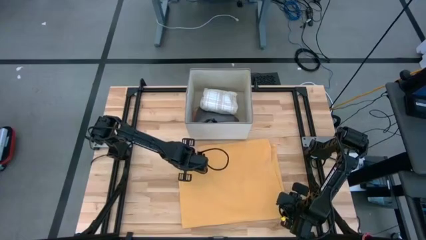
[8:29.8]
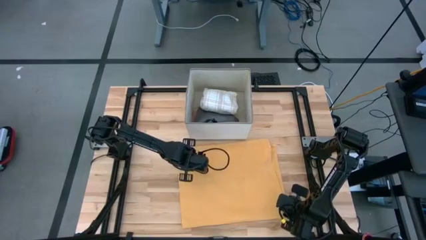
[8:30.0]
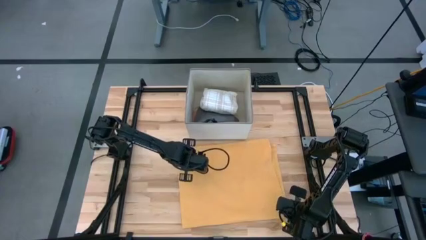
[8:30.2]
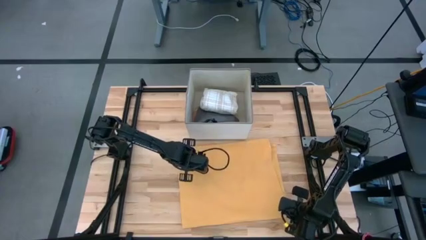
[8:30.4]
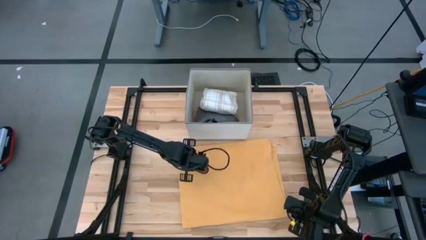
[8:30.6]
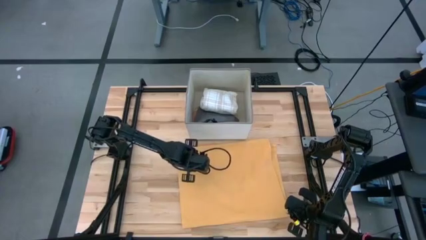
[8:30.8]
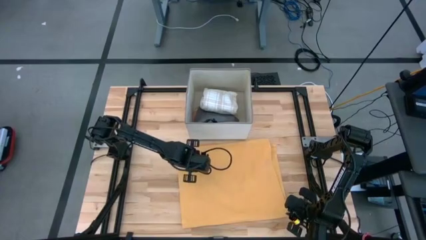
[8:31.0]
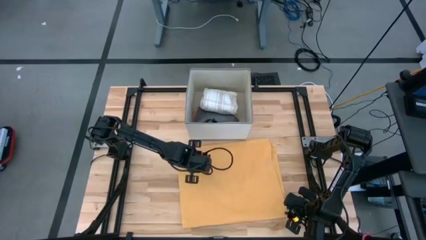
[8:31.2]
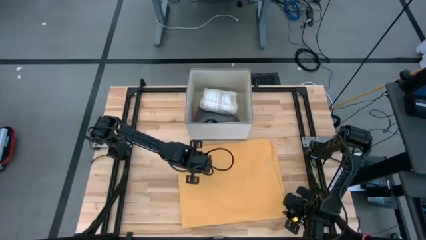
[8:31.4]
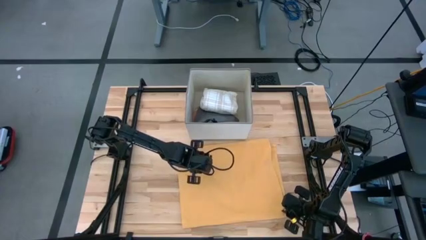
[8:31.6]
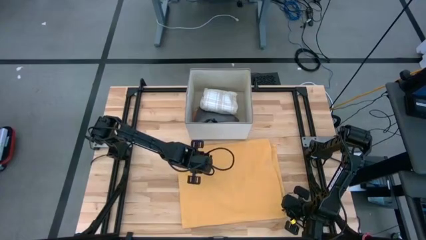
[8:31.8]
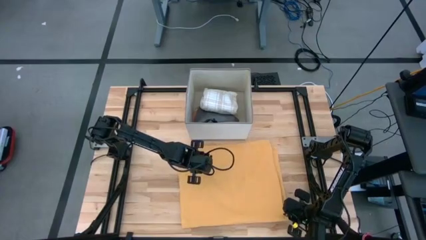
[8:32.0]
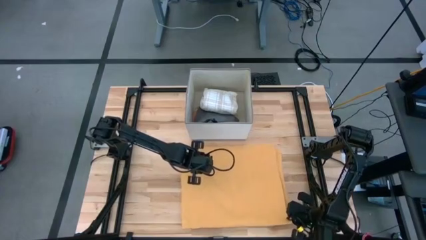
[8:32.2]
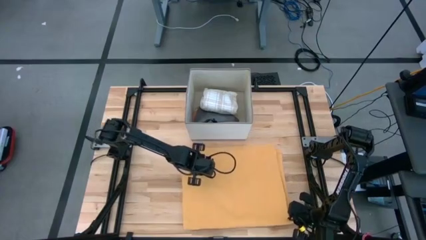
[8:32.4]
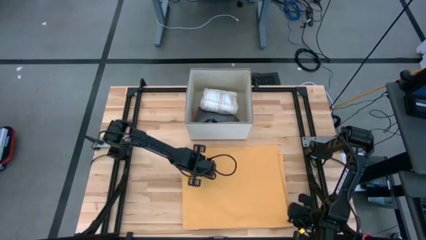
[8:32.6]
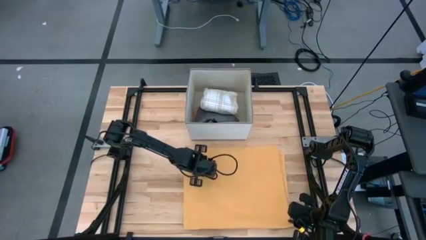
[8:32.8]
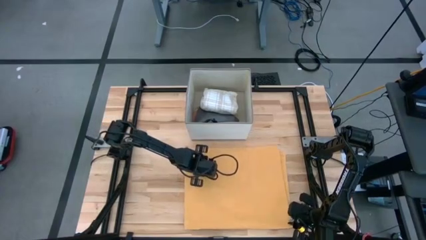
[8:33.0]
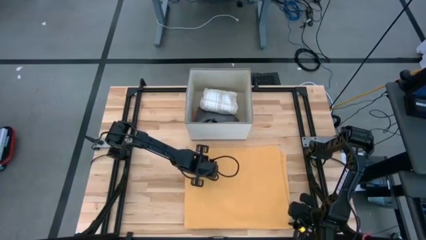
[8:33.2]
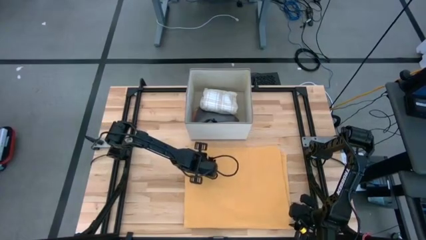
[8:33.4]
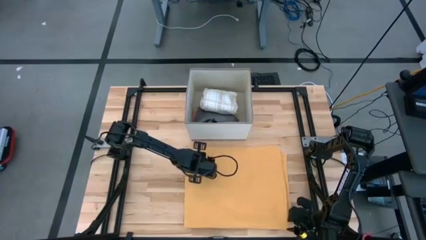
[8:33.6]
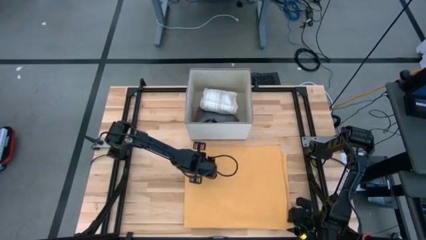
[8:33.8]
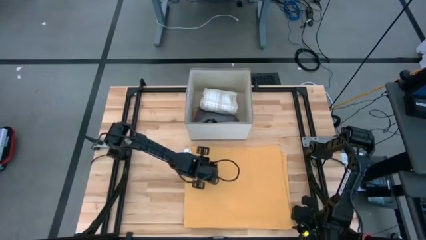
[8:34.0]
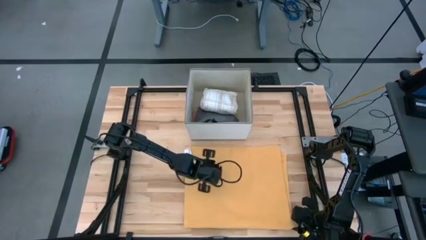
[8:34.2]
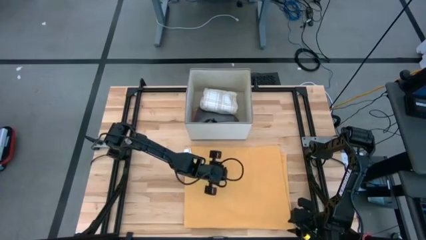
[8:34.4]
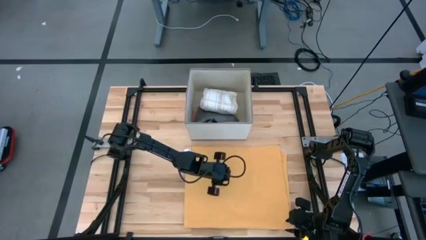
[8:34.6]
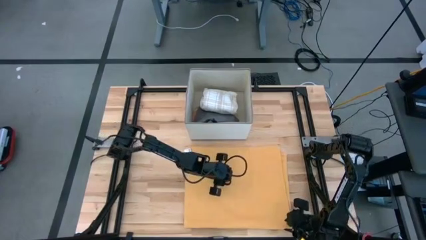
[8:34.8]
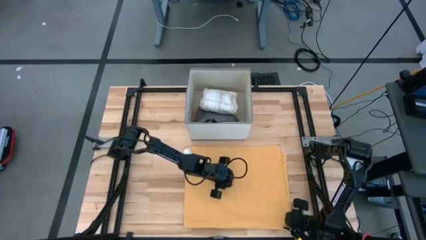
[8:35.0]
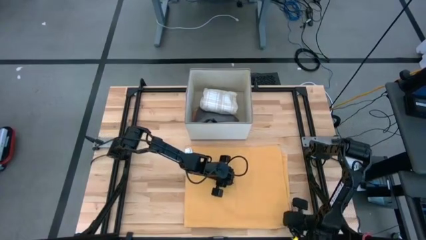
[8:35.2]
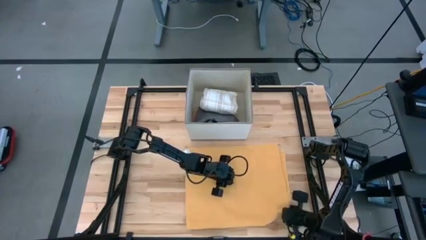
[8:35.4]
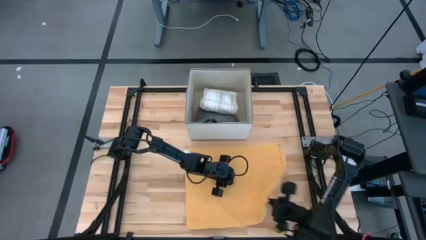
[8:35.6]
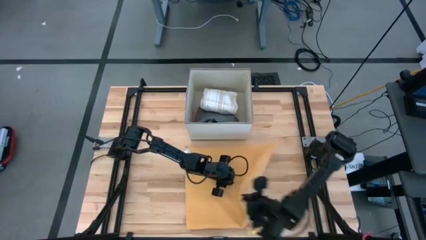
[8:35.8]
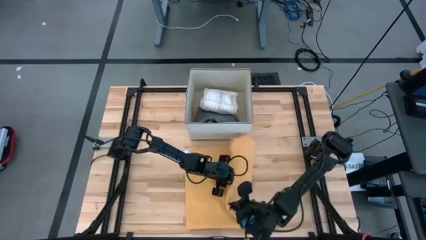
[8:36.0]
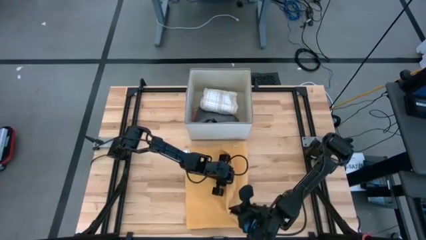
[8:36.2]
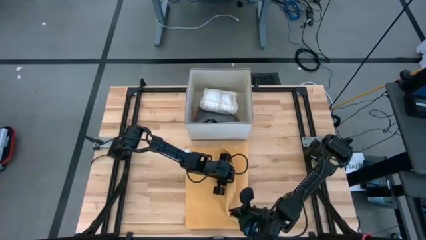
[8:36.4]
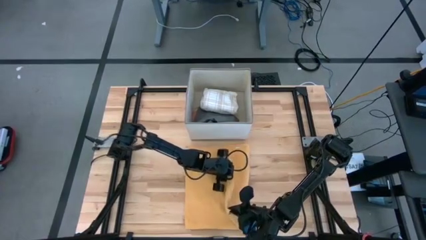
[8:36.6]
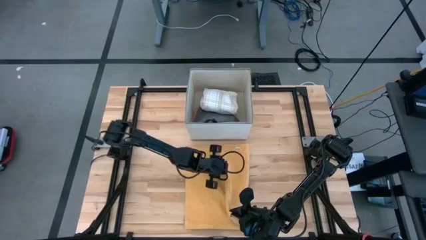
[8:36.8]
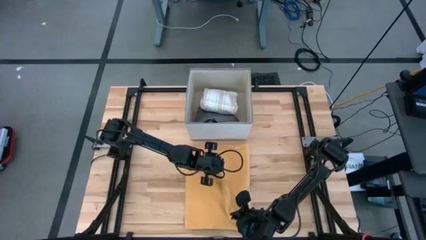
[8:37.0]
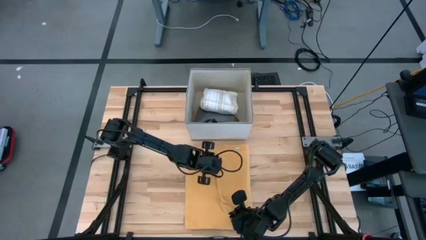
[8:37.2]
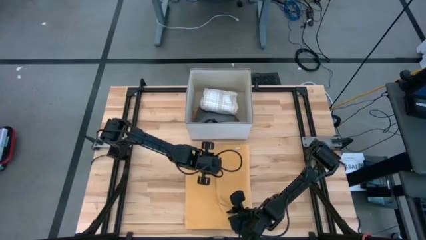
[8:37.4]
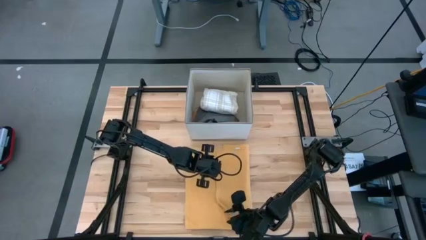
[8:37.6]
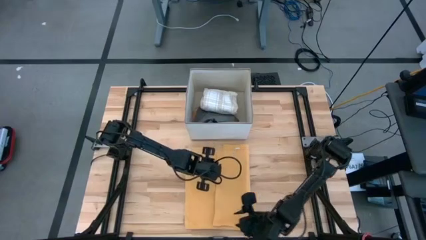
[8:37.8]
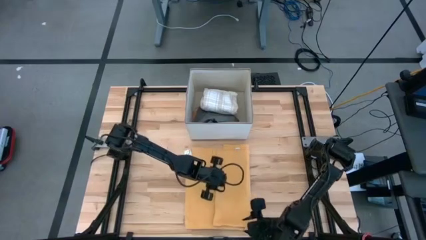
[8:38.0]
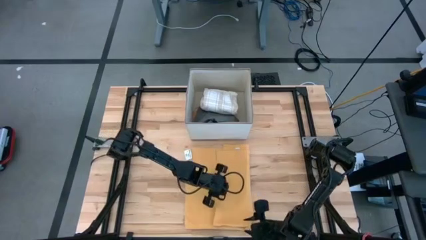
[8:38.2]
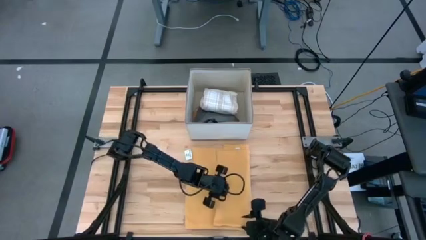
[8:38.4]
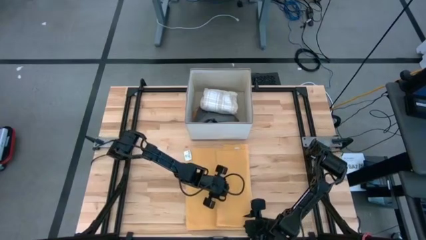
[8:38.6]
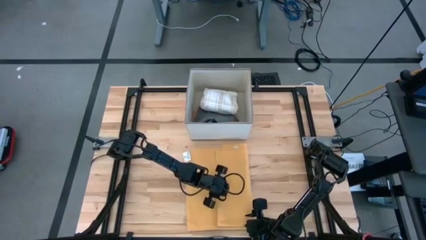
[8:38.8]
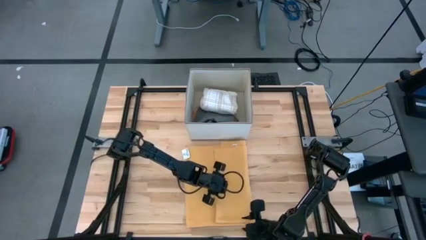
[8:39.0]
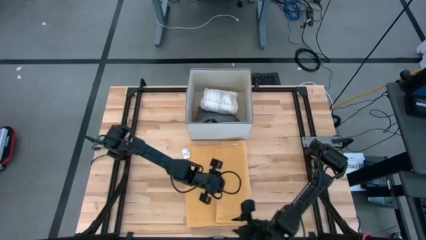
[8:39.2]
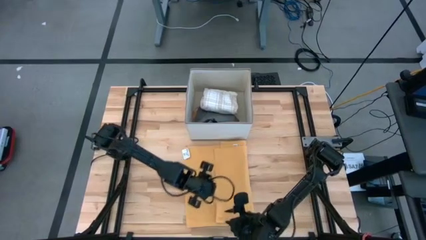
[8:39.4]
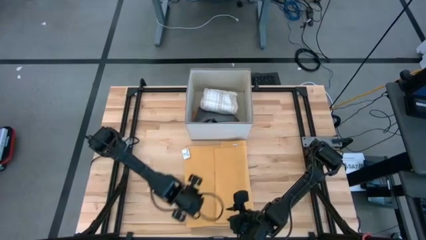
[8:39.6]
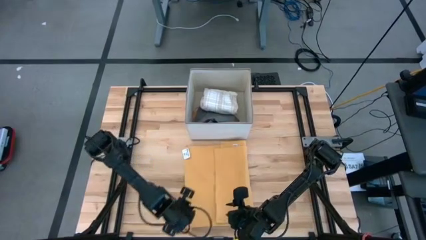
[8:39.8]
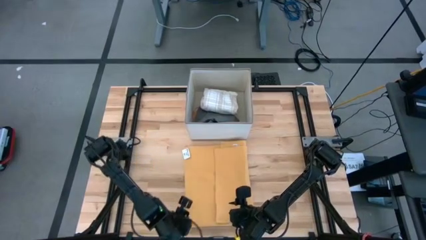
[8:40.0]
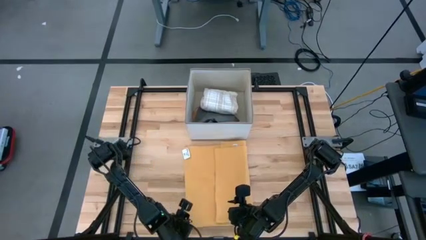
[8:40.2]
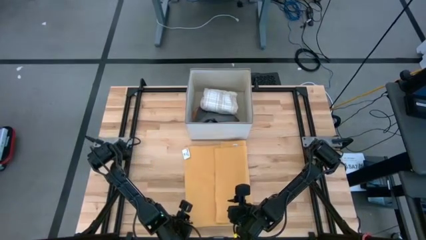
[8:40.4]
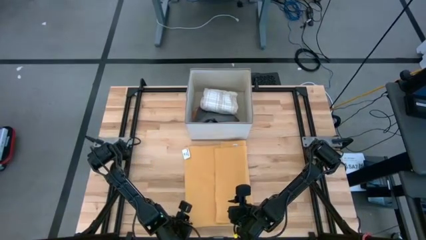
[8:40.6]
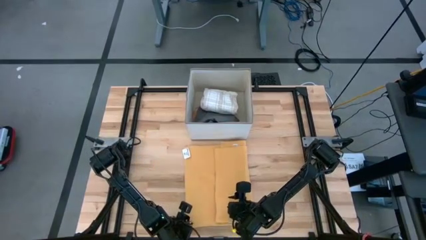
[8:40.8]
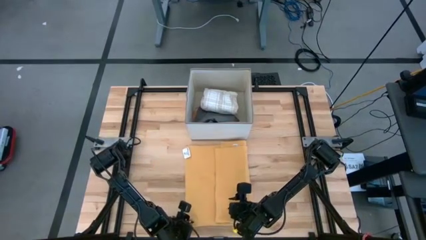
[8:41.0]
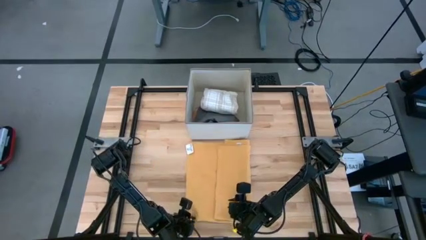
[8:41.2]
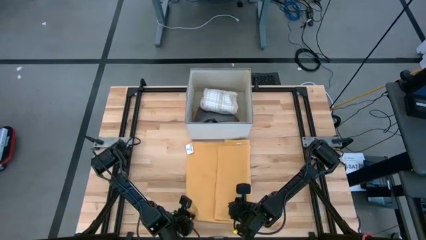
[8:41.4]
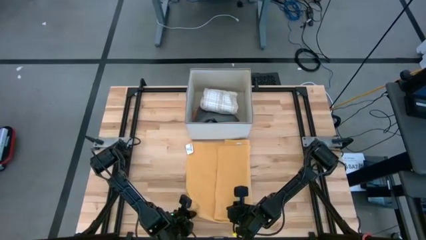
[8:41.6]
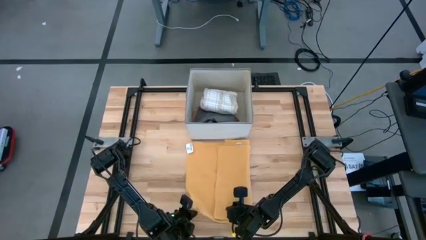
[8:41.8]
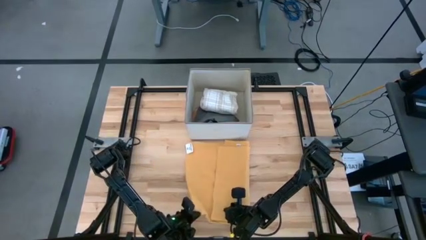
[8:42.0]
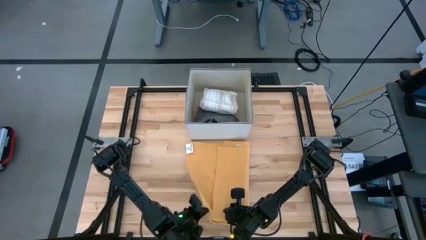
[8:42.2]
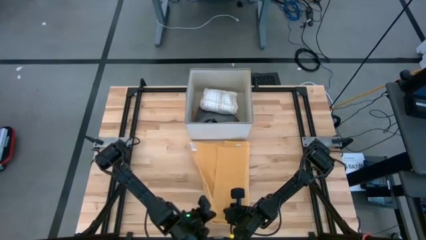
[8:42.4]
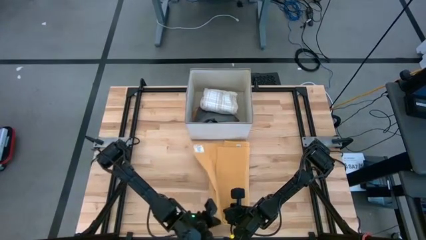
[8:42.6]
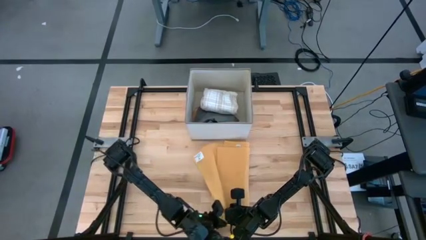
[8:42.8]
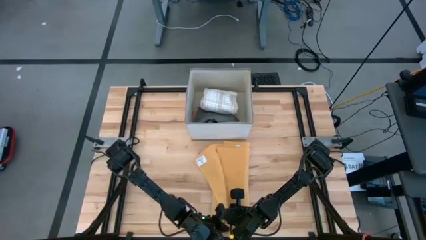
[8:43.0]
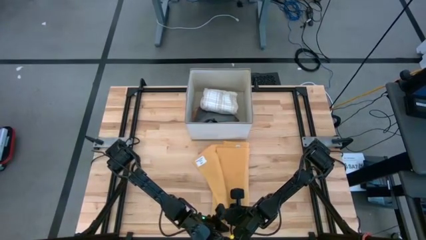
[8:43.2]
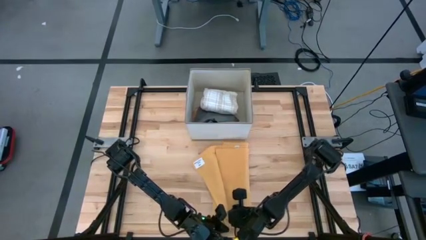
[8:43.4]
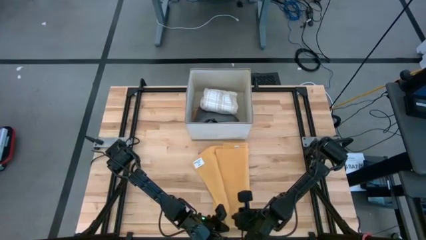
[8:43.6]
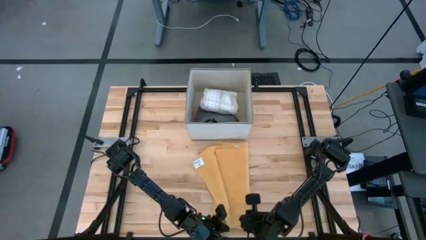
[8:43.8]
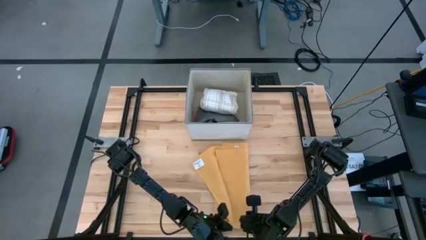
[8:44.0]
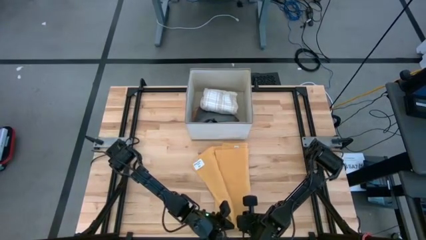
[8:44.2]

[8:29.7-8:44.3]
Task: Fold towel
Fold the orange towel
